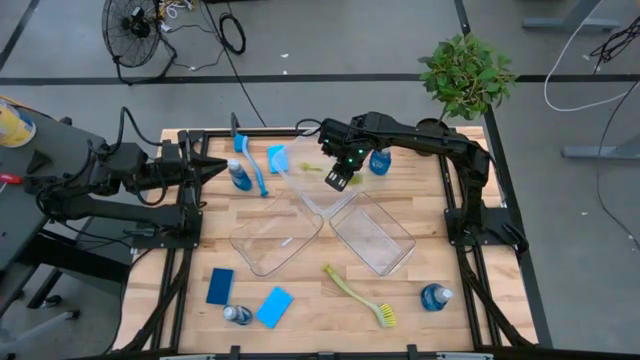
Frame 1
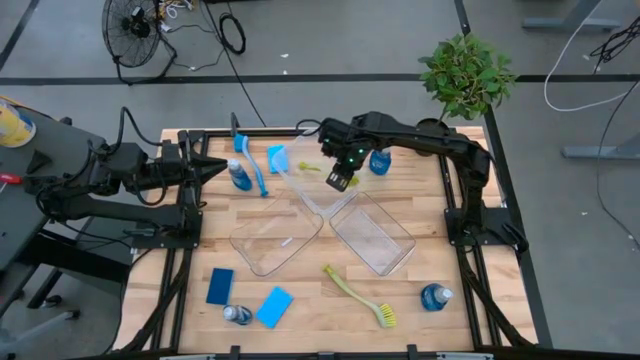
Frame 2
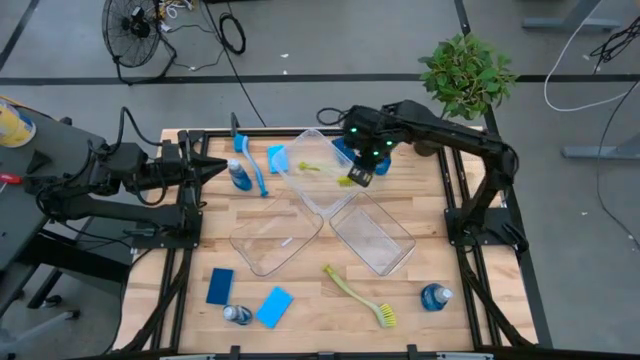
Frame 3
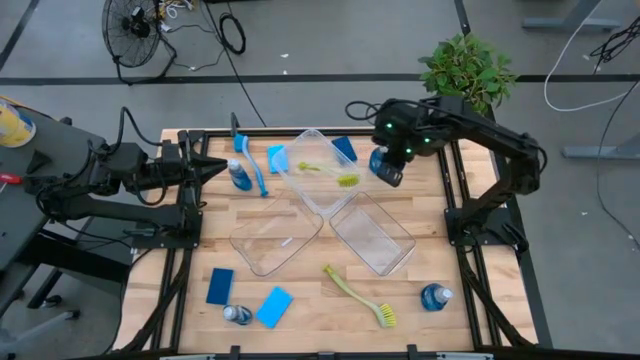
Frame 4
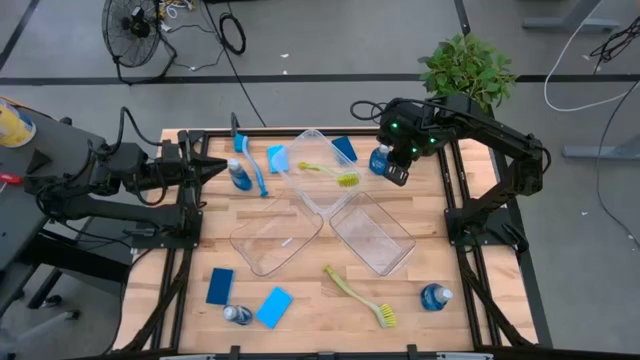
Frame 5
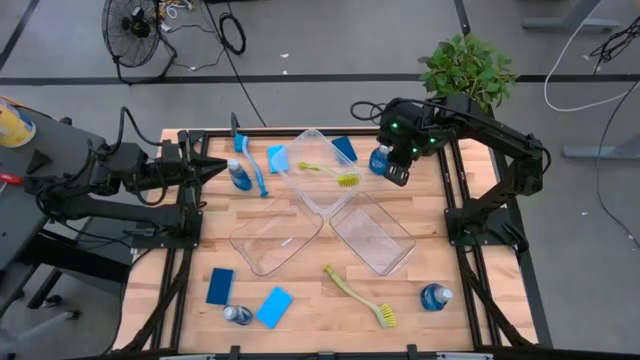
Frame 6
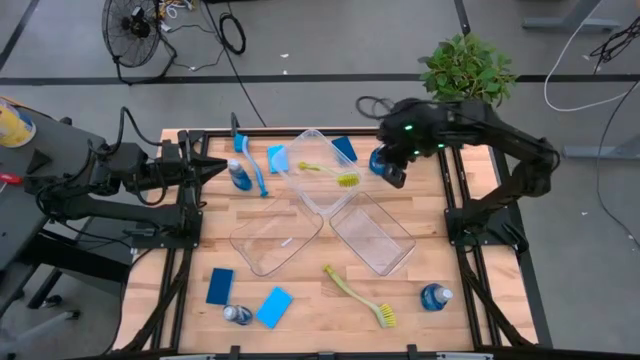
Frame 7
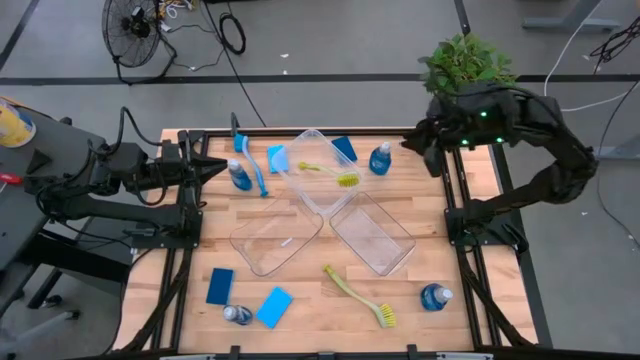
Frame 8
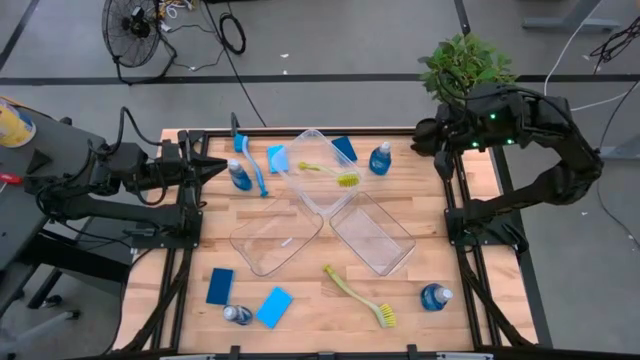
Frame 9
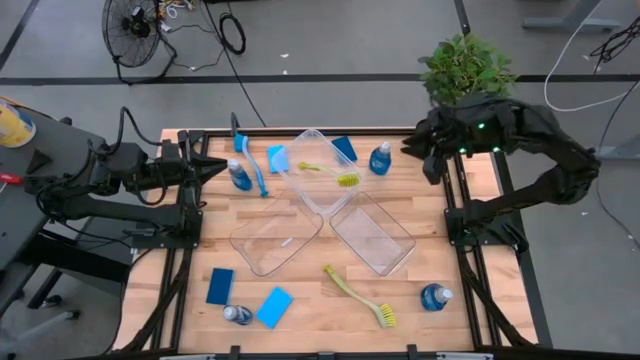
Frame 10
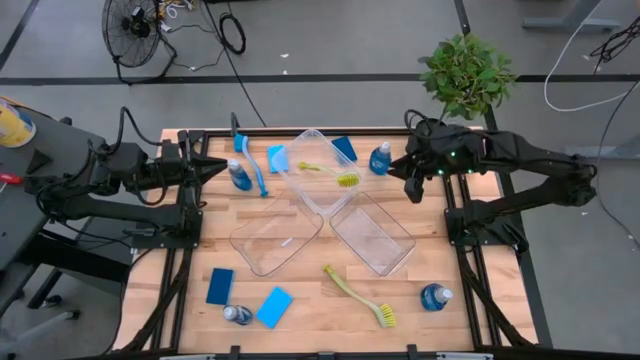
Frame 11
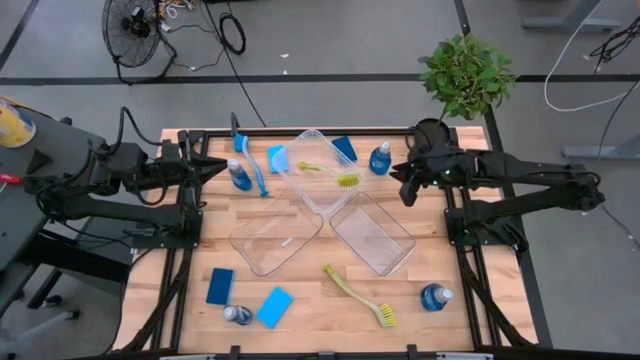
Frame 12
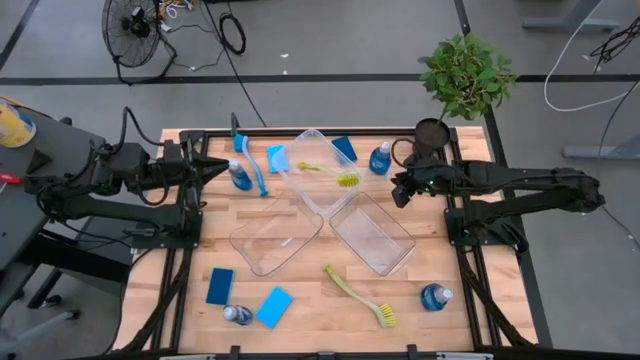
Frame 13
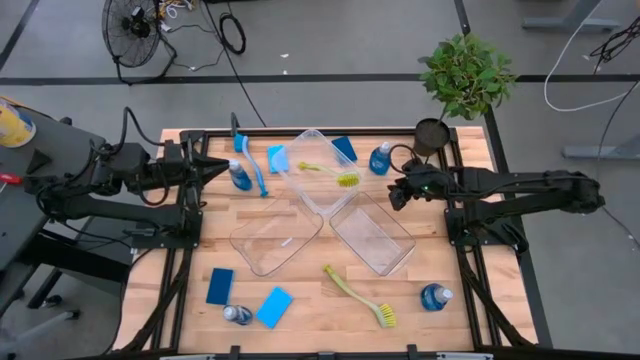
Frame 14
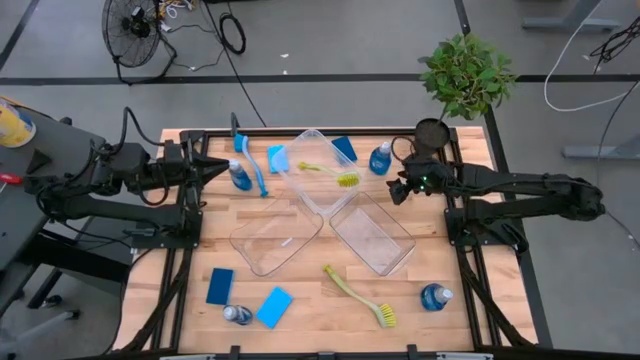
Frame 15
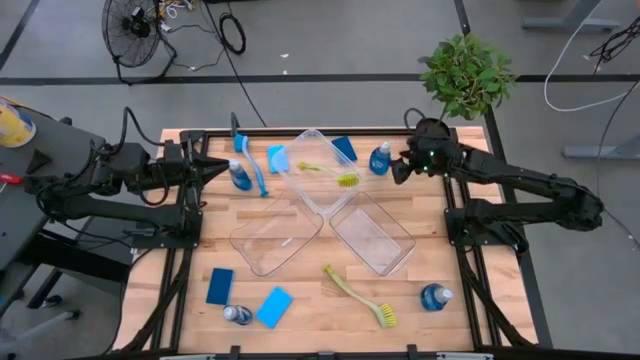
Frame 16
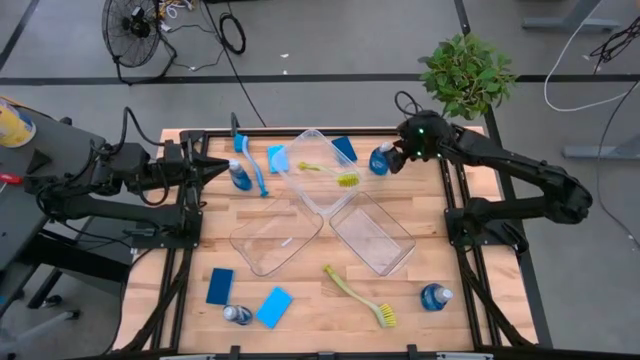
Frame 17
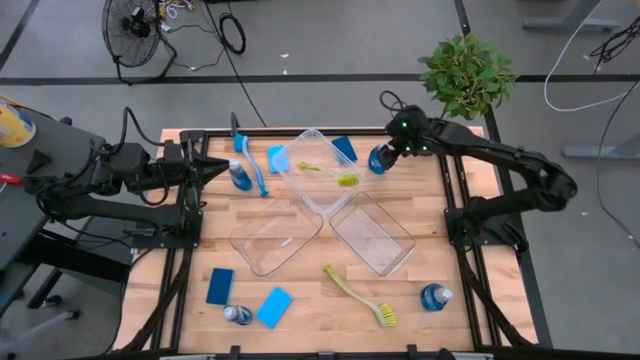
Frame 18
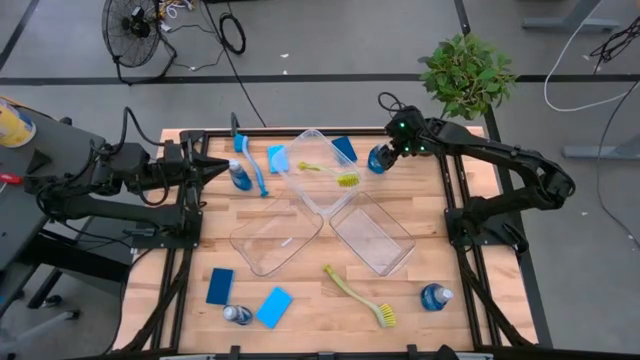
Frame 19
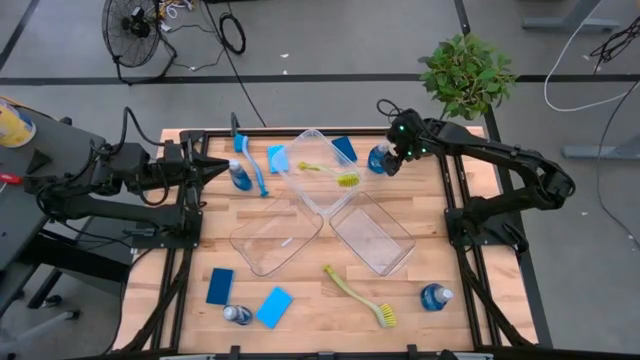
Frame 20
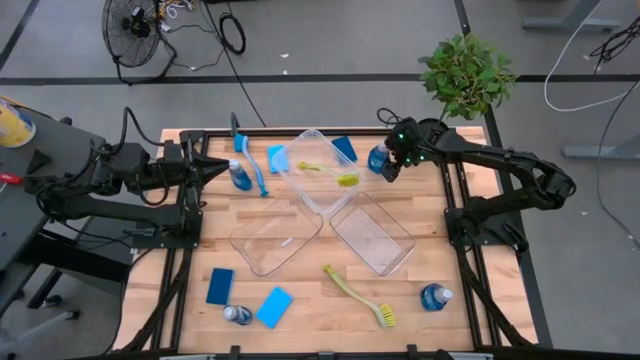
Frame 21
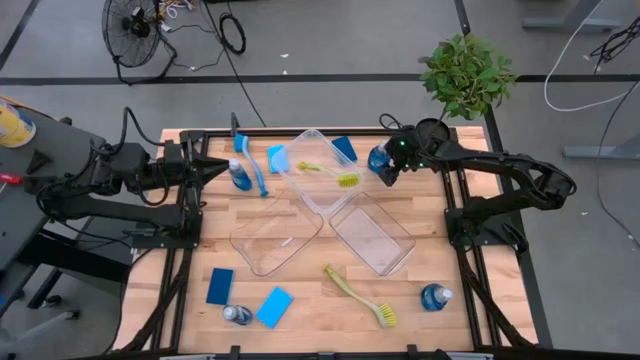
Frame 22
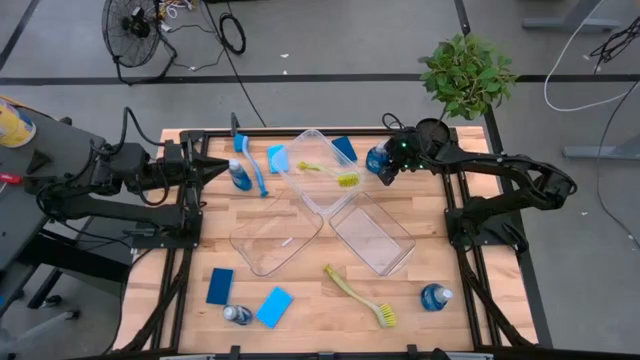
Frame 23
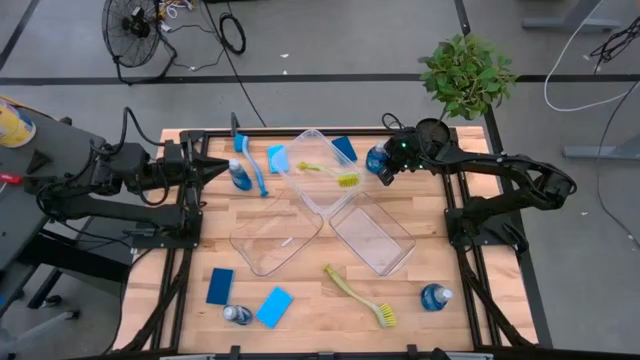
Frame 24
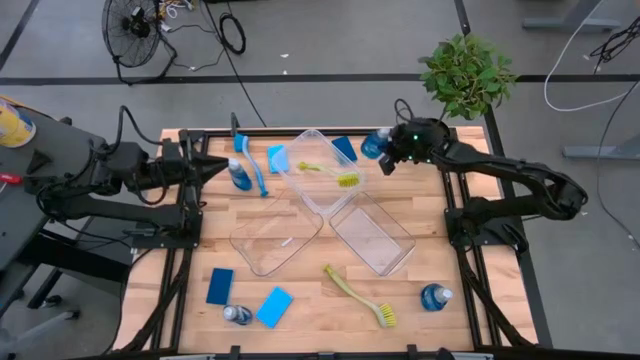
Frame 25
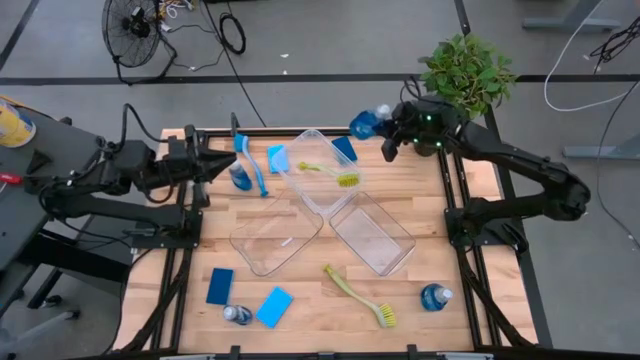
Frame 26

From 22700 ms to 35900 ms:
Task: Pick & Place Kitchen Sink Supplies
Put the blue dishwashing liquid into the left transparent bin

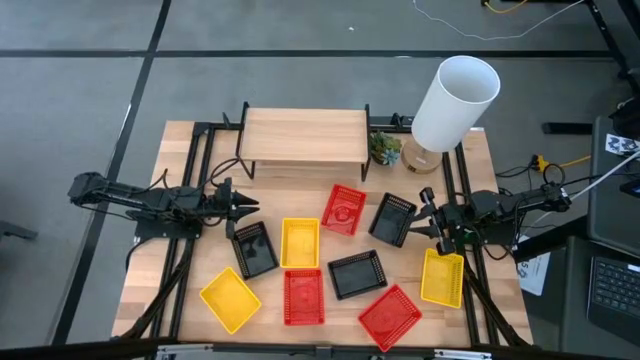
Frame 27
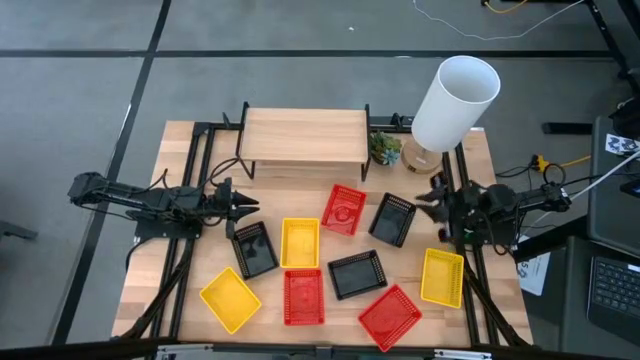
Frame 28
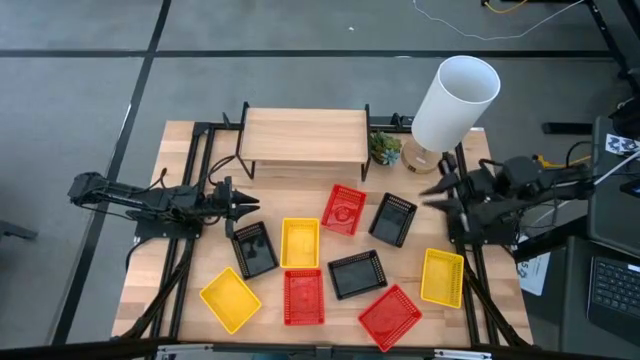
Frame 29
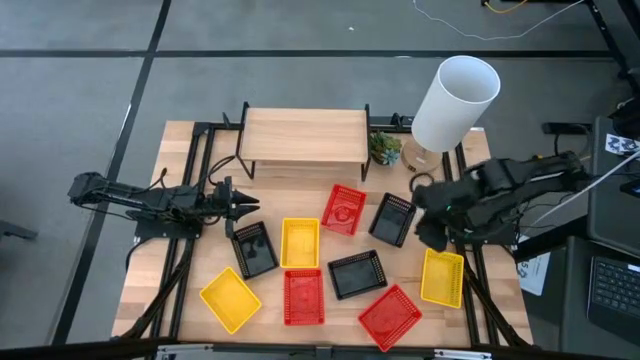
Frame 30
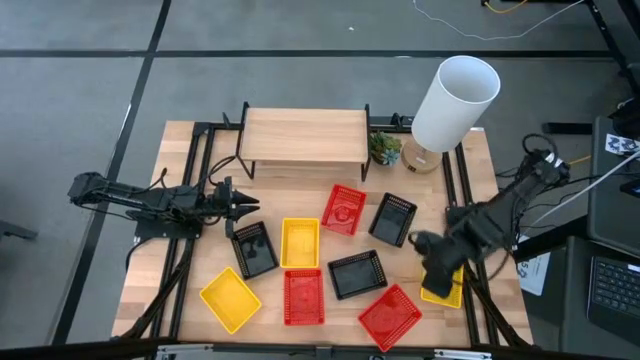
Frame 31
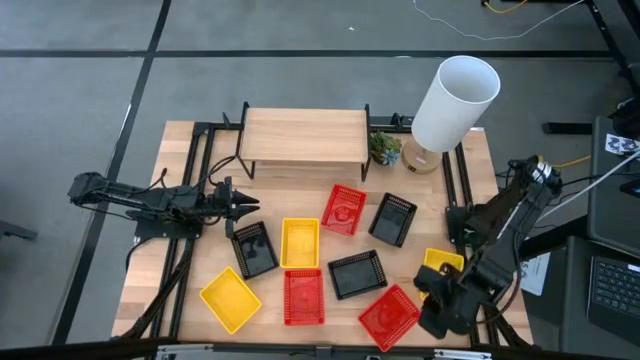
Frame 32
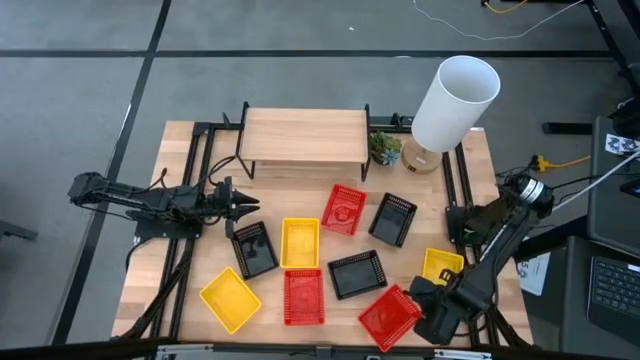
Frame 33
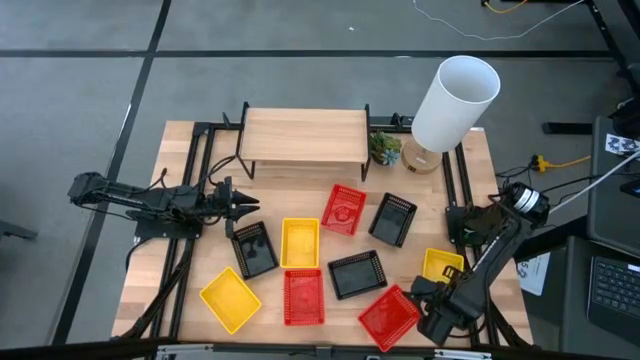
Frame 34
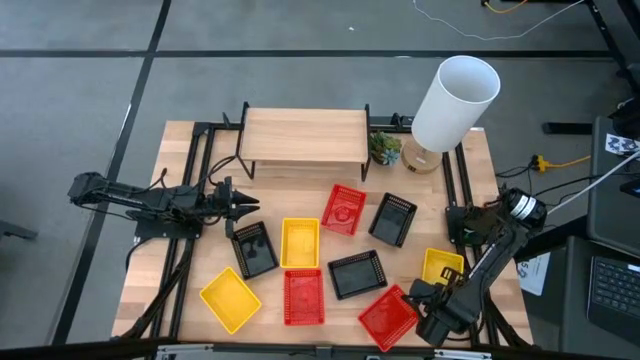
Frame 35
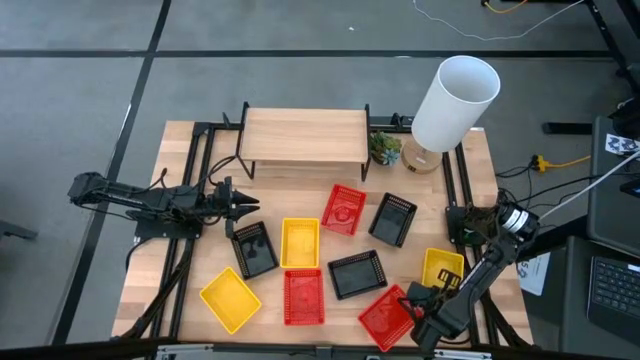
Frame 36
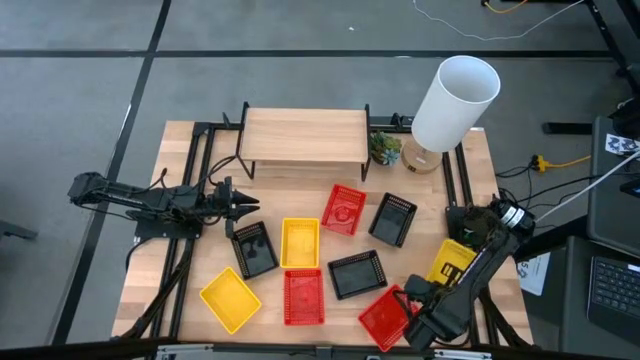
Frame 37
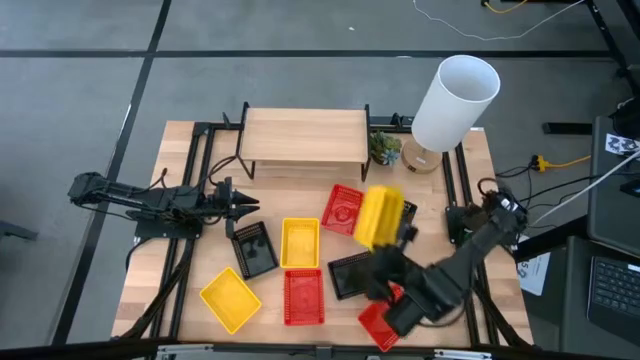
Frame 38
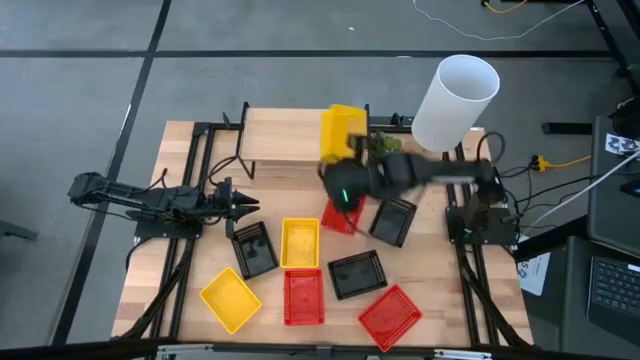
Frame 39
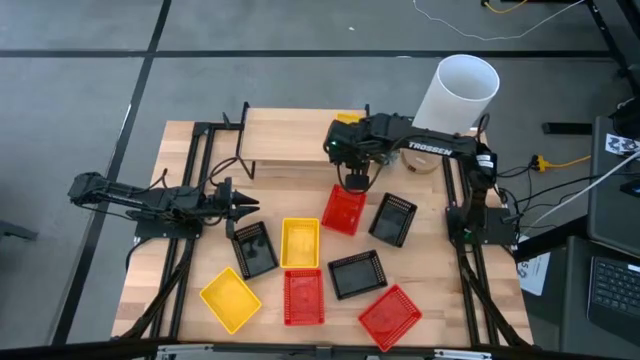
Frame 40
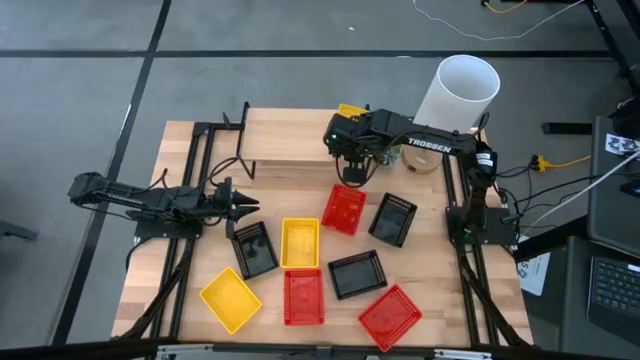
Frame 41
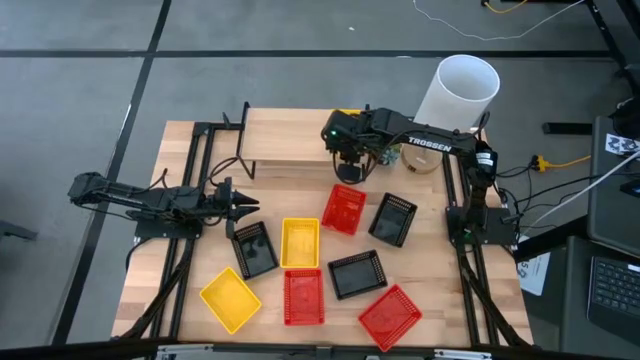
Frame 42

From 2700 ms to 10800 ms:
Task: Stack baskets on shelf by color
Put the right yellow bin on the shelf
